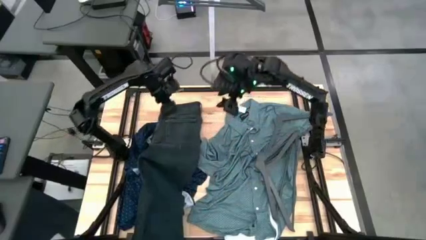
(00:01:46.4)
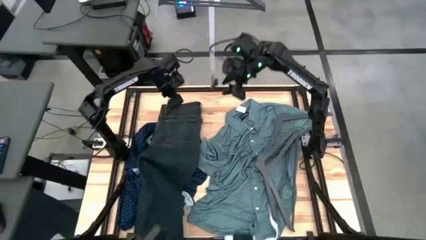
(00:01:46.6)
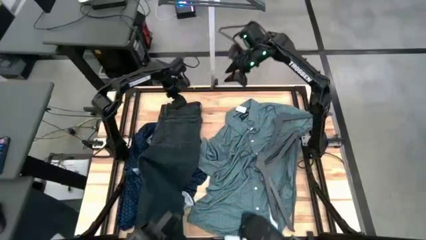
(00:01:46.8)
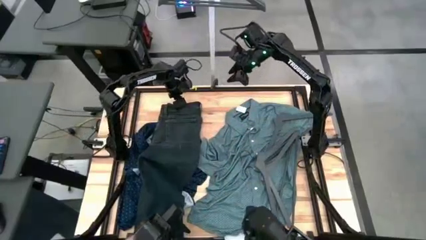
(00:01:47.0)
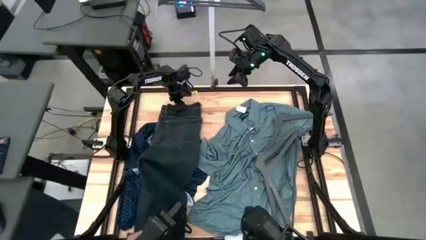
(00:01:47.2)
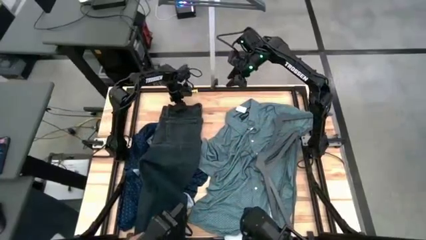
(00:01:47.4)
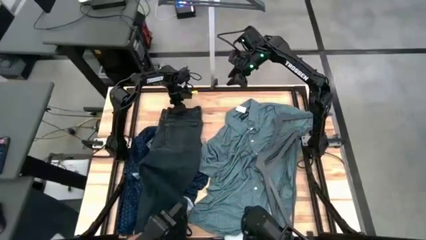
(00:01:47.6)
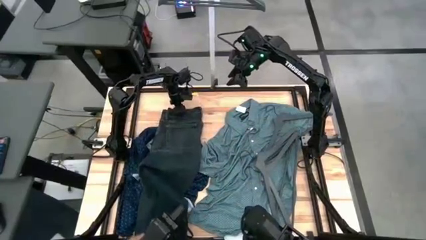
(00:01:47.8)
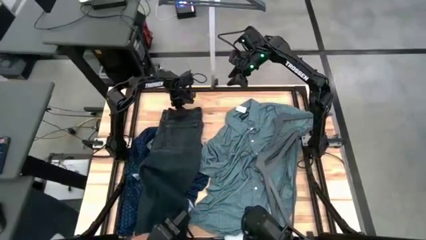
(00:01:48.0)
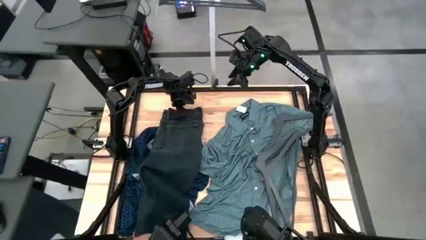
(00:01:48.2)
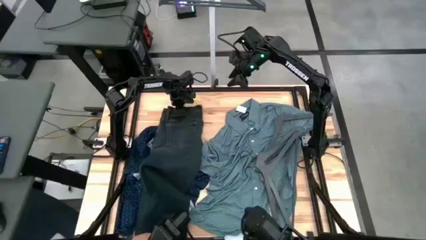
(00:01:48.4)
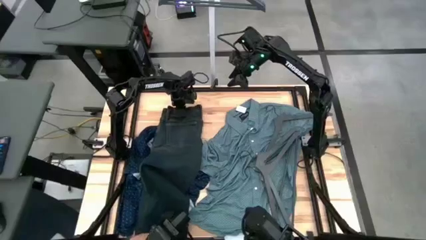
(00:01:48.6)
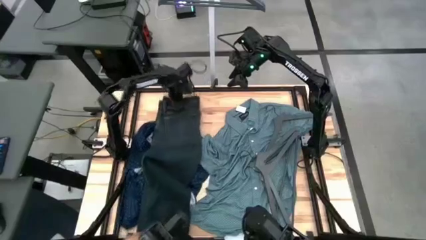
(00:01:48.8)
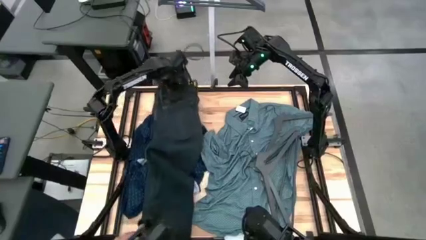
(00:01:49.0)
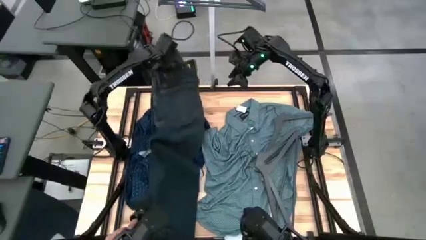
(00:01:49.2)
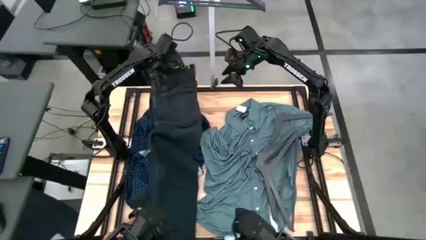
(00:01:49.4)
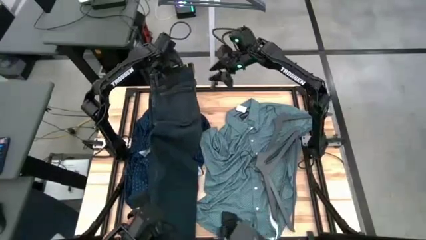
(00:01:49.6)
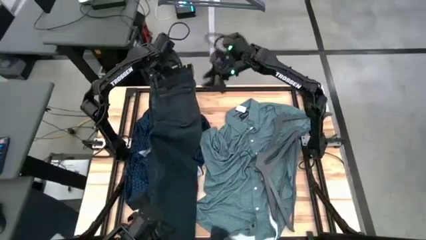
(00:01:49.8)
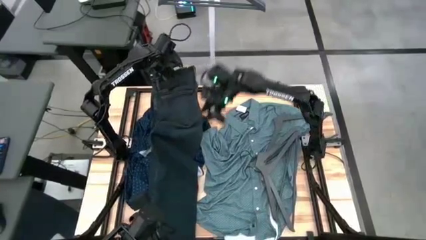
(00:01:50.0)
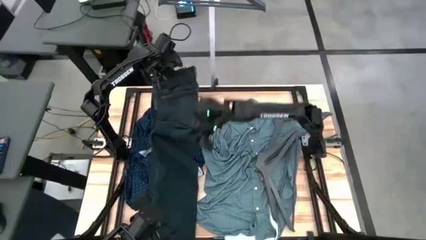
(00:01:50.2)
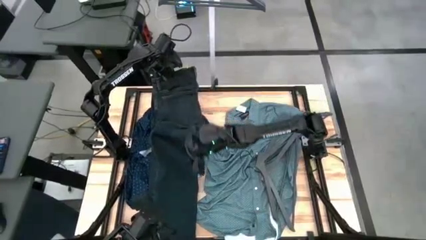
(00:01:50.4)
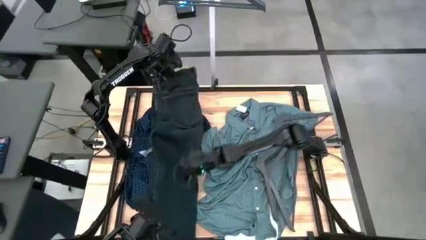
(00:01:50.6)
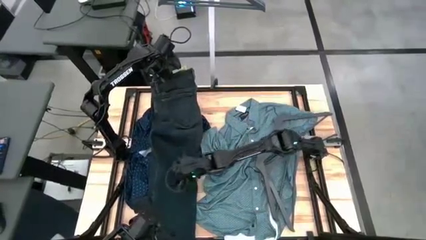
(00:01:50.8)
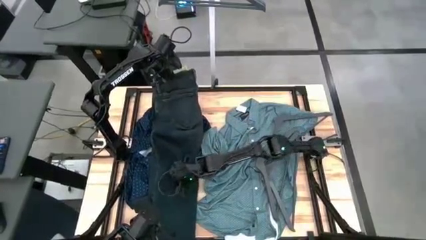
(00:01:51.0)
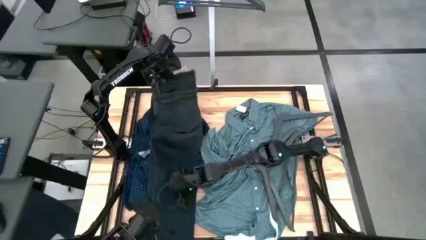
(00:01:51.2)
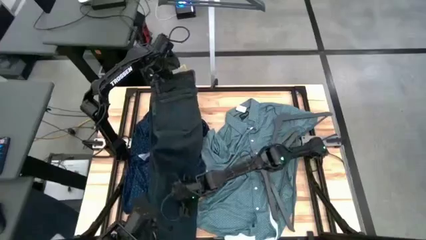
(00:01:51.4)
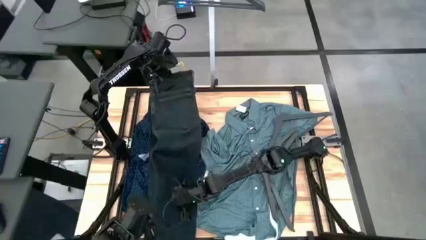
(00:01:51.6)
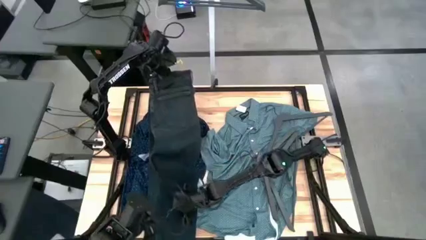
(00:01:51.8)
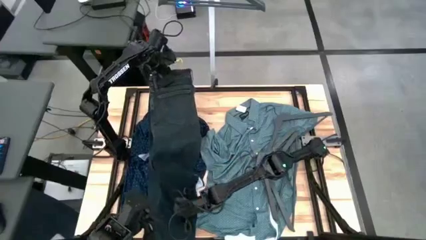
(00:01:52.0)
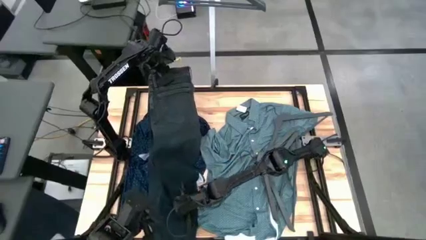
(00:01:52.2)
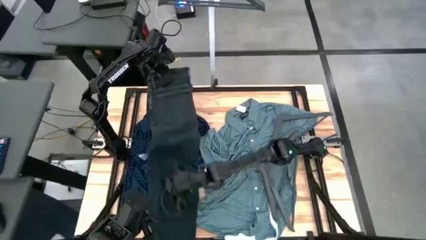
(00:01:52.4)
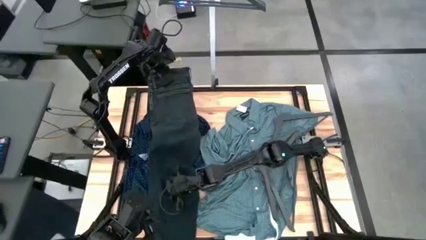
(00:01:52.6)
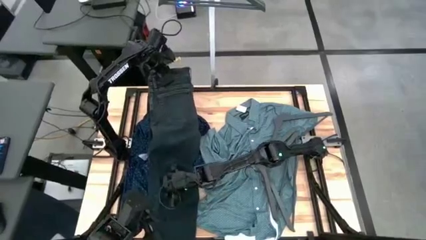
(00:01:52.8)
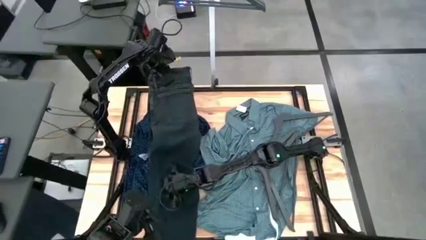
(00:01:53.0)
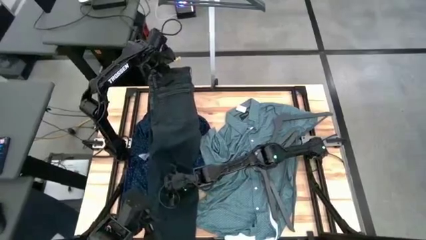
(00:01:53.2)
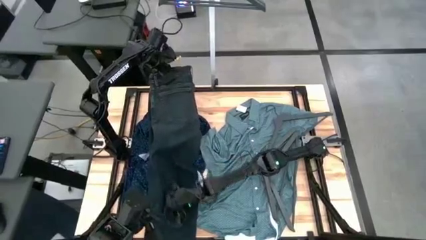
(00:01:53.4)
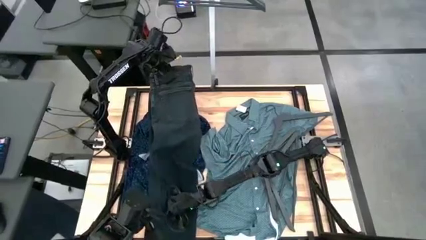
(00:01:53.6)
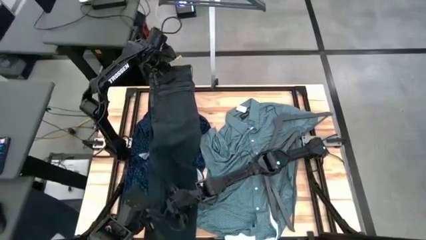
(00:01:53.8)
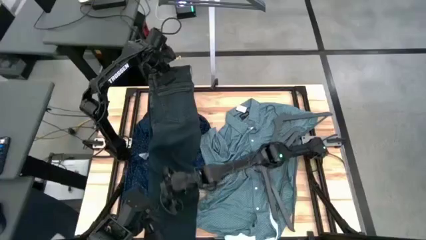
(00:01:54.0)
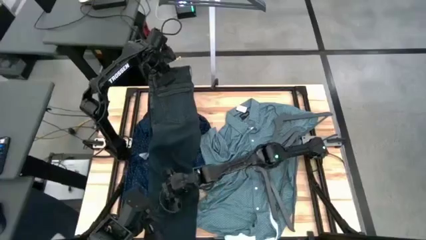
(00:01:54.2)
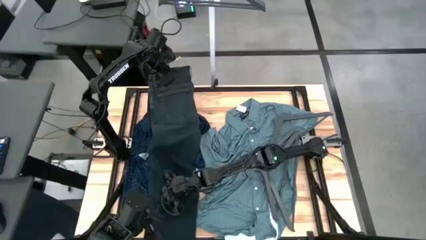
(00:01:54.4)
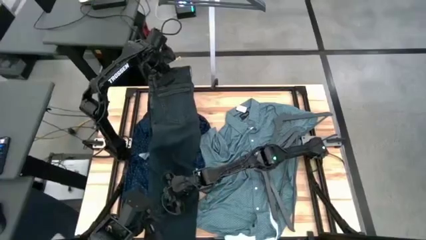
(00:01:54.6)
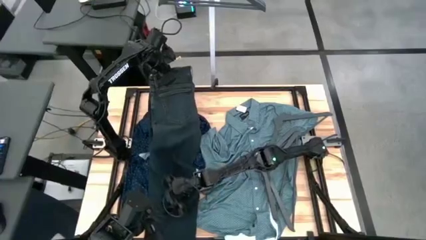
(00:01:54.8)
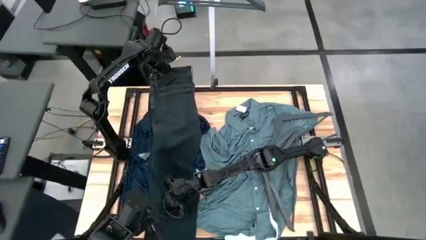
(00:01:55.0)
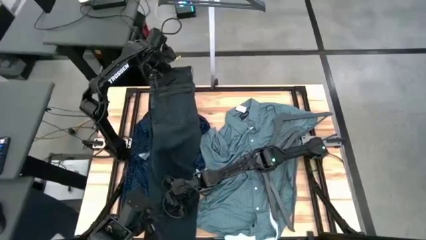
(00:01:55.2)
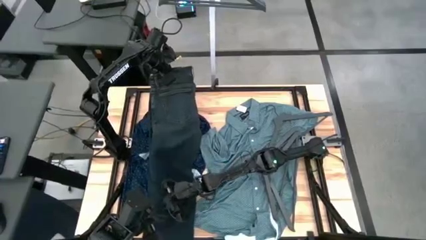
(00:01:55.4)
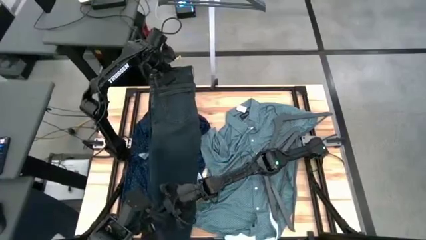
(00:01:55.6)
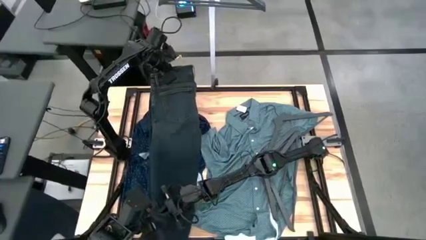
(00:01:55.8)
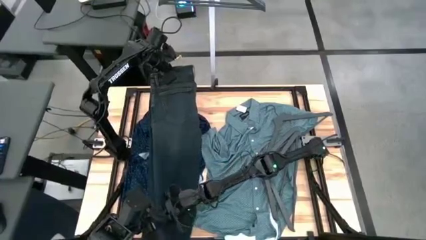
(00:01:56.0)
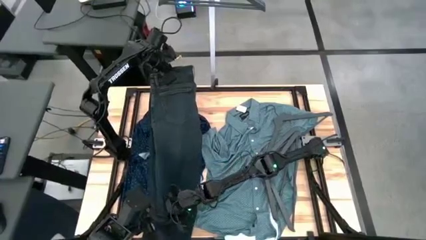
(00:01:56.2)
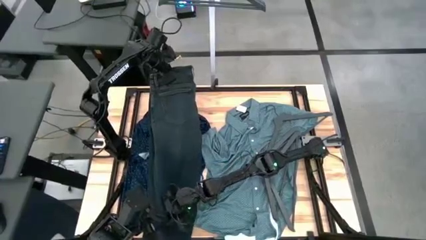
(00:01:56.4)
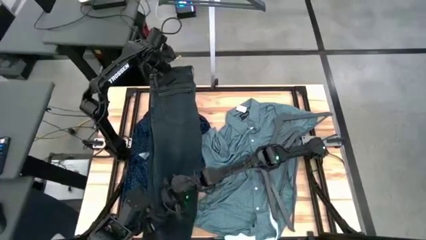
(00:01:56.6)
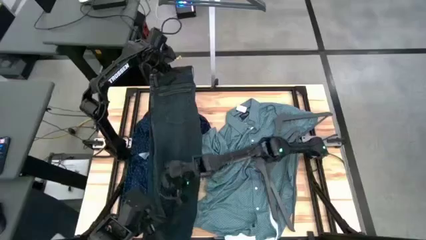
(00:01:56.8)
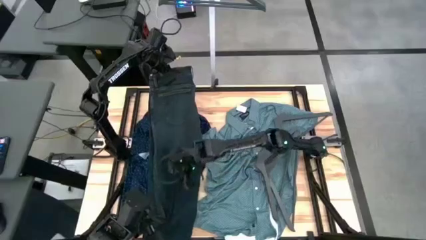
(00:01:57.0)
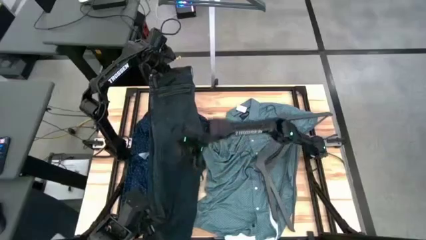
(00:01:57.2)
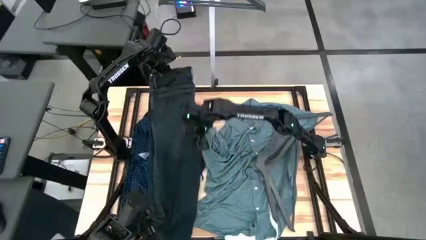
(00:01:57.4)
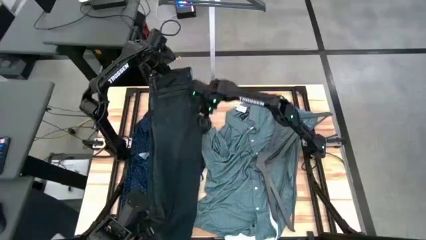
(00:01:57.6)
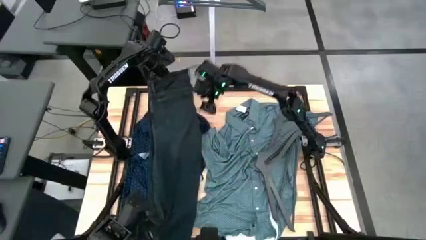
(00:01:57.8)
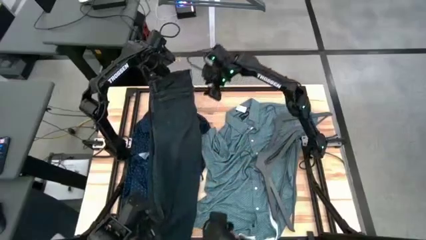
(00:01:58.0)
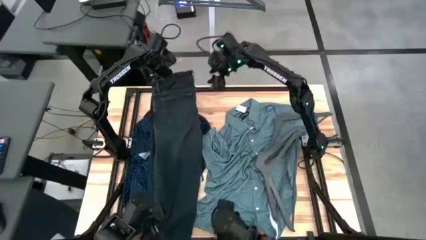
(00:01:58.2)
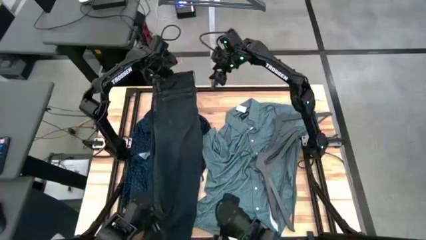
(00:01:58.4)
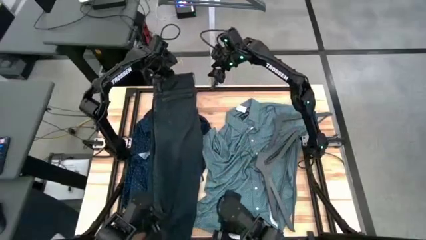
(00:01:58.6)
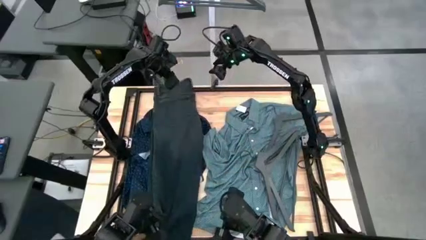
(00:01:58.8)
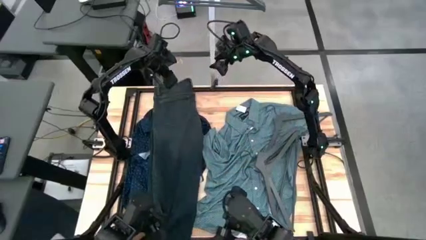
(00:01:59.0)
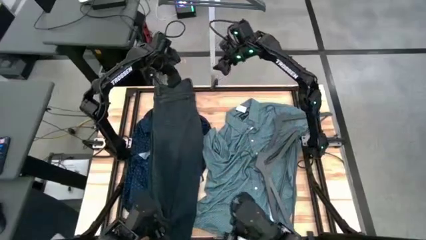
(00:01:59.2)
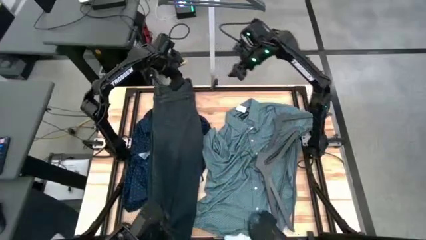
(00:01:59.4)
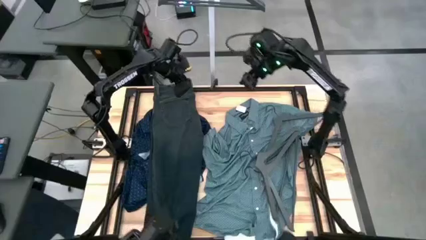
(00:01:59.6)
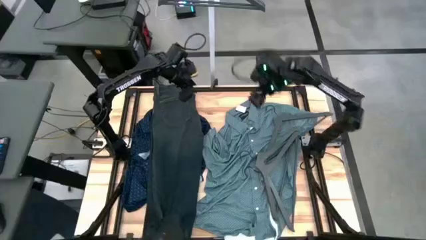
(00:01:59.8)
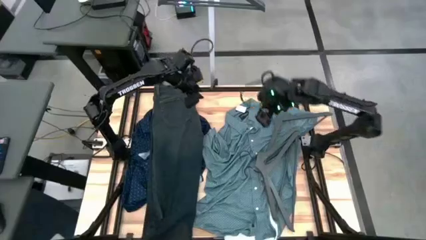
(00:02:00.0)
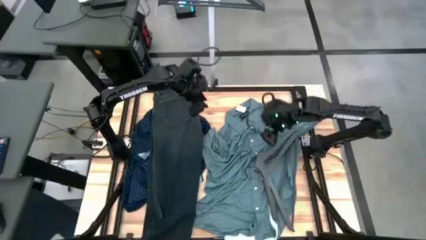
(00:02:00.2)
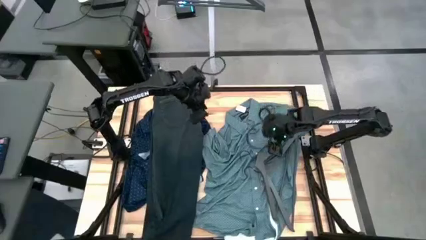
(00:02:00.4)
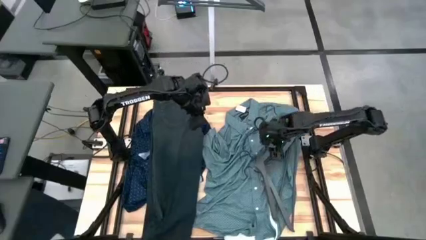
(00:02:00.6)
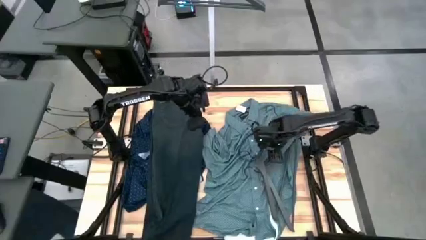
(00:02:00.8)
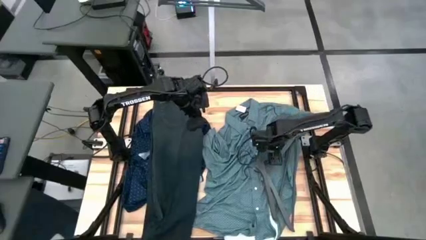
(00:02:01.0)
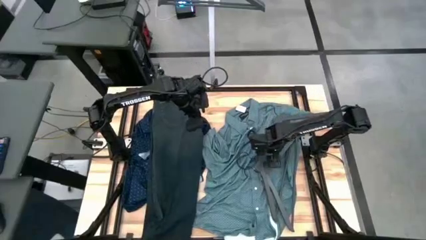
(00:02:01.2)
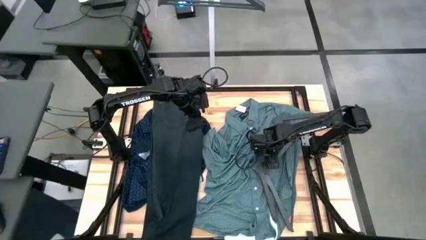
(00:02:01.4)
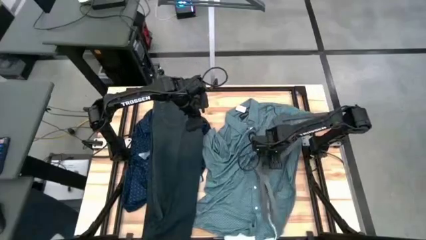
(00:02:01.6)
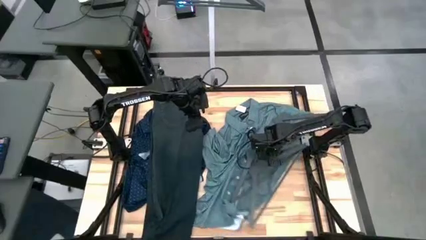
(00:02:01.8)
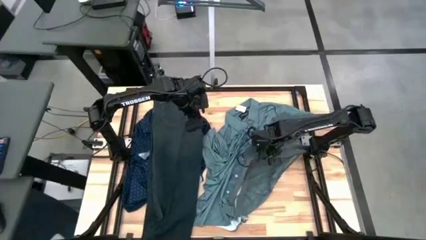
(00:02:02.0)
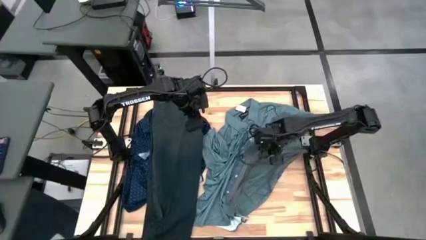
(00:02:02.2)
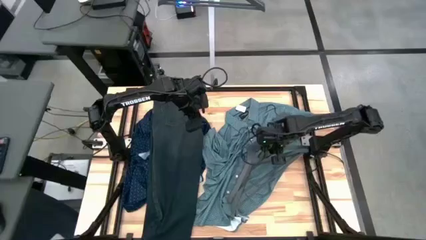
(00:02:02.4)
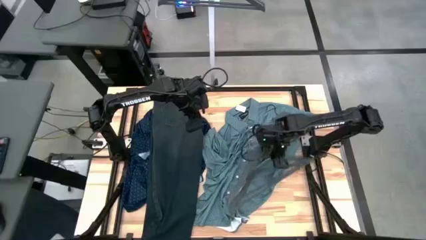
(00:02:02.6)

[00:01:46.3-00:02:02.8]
Task: Hang clothes
Hang the black pants on the rack
